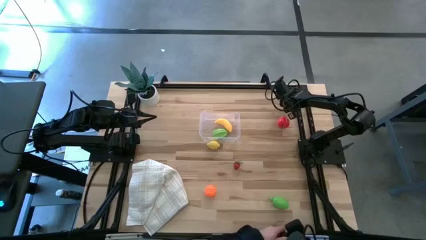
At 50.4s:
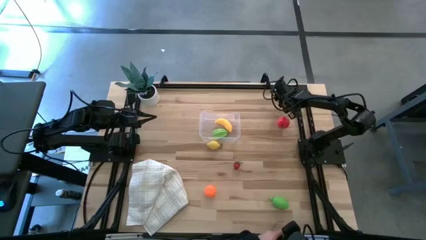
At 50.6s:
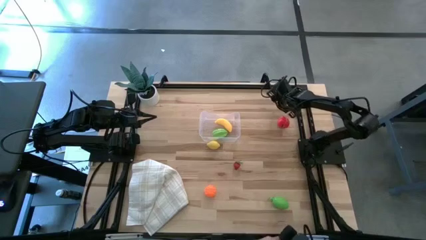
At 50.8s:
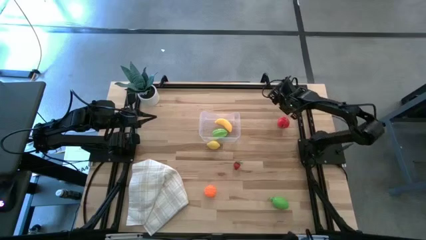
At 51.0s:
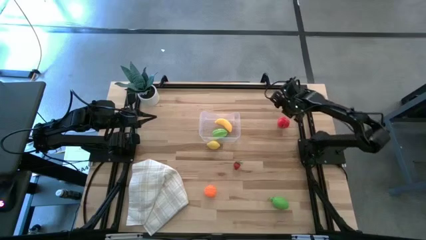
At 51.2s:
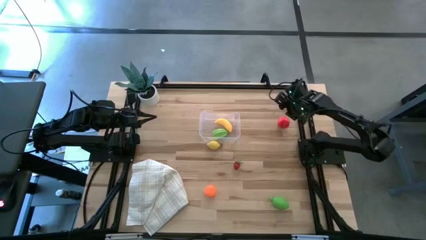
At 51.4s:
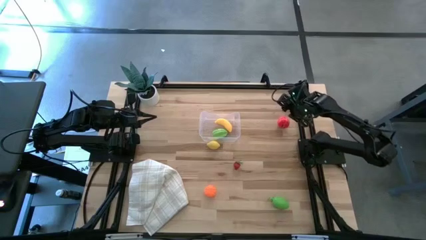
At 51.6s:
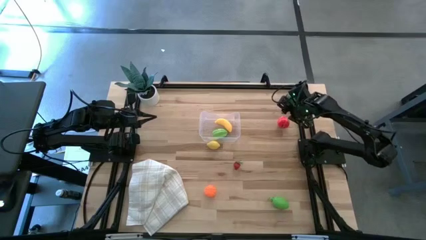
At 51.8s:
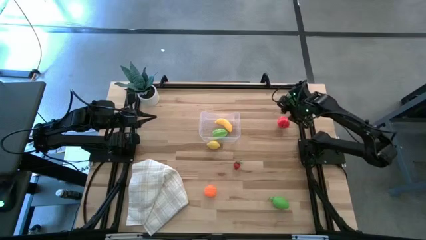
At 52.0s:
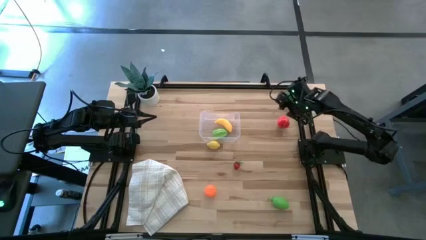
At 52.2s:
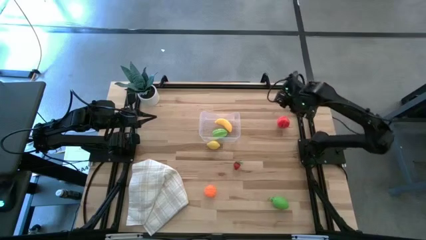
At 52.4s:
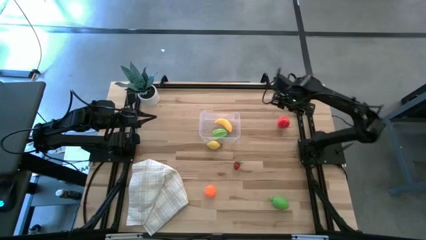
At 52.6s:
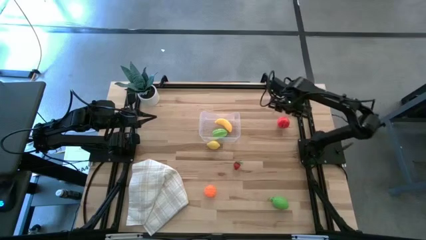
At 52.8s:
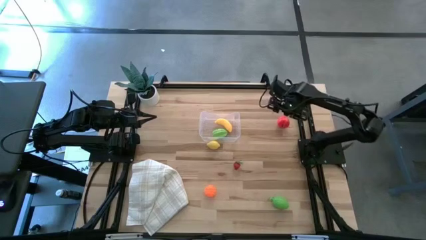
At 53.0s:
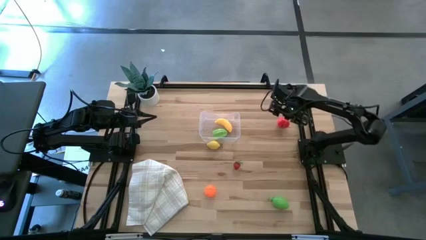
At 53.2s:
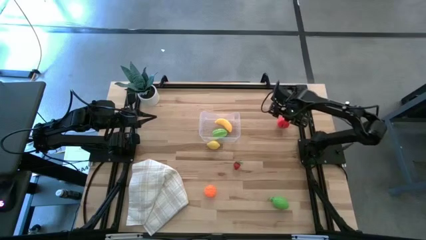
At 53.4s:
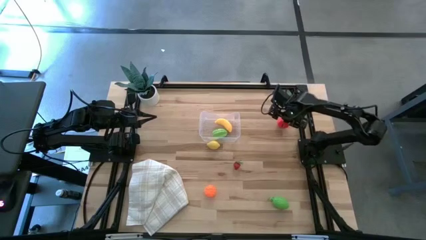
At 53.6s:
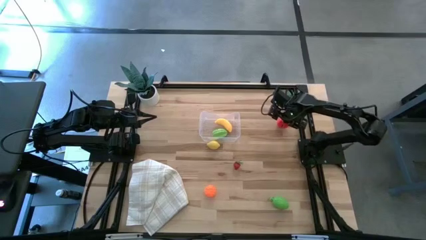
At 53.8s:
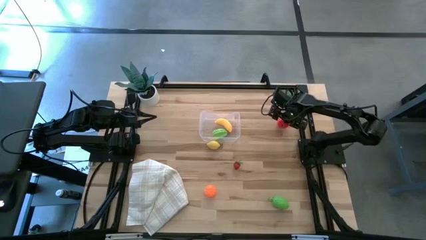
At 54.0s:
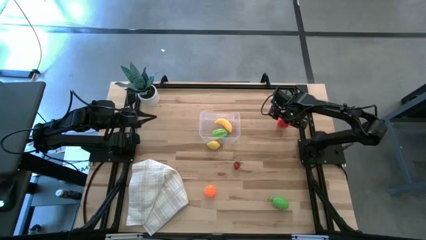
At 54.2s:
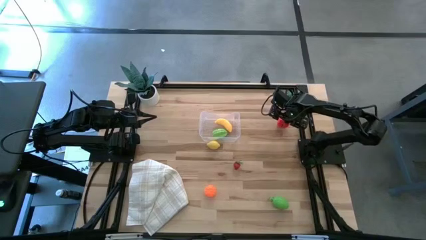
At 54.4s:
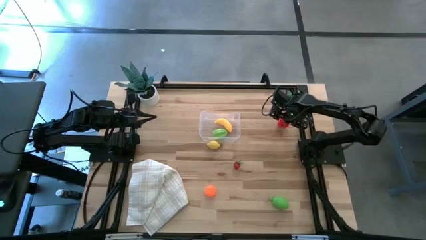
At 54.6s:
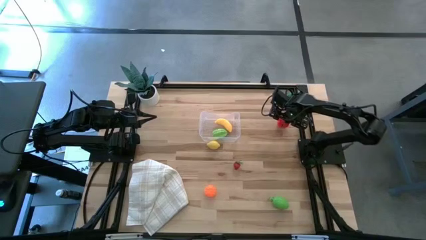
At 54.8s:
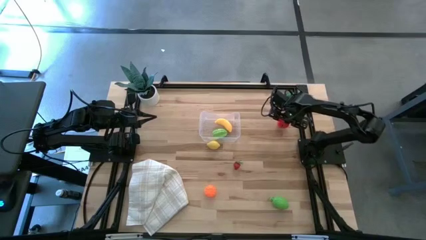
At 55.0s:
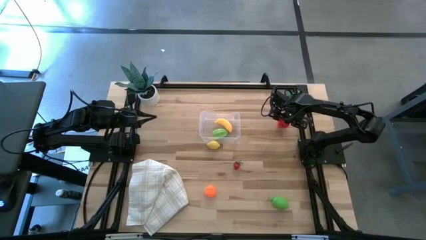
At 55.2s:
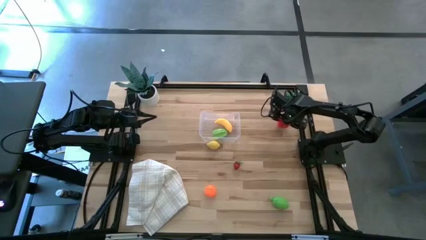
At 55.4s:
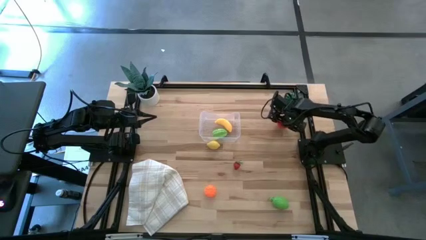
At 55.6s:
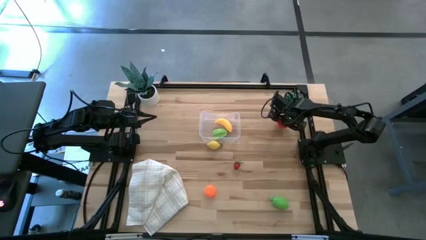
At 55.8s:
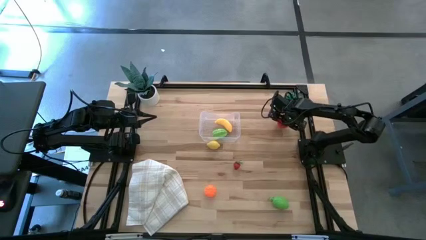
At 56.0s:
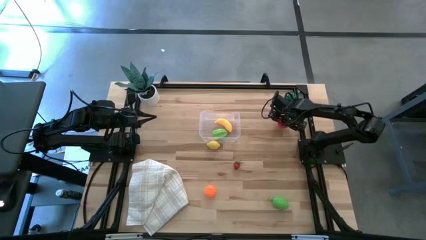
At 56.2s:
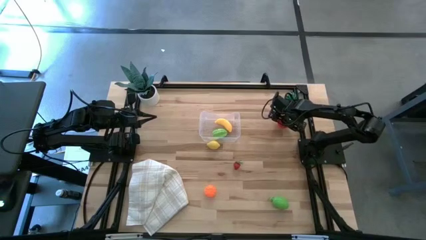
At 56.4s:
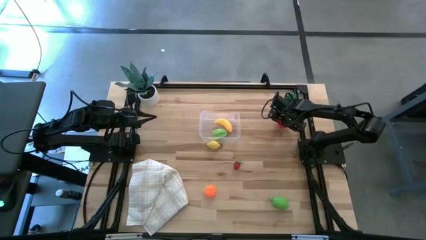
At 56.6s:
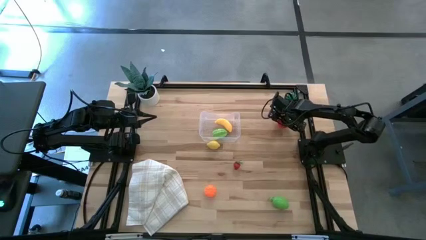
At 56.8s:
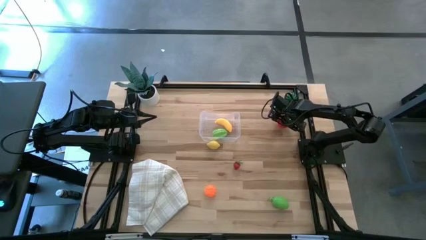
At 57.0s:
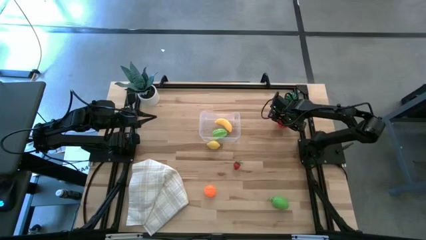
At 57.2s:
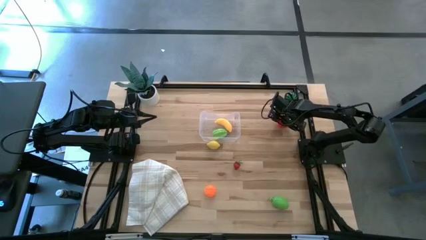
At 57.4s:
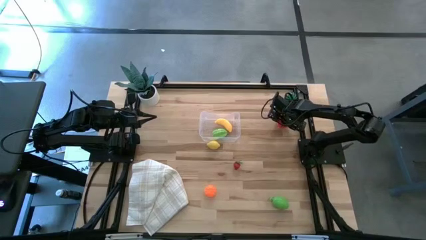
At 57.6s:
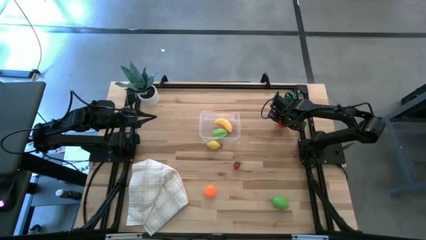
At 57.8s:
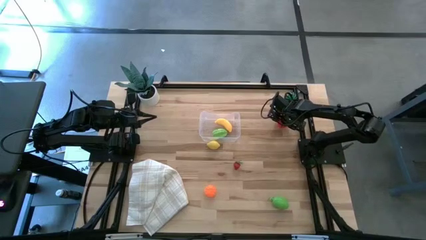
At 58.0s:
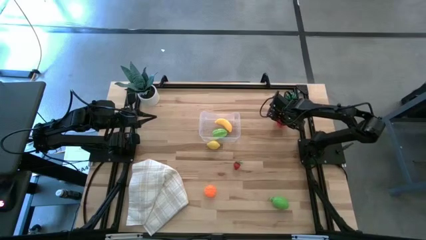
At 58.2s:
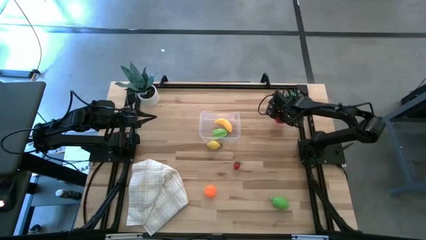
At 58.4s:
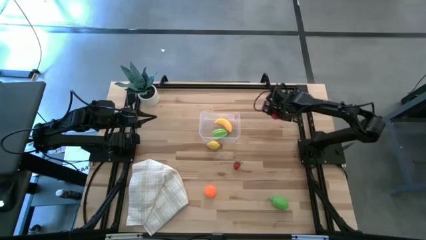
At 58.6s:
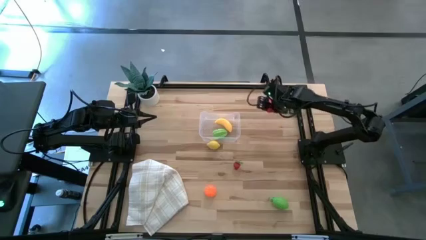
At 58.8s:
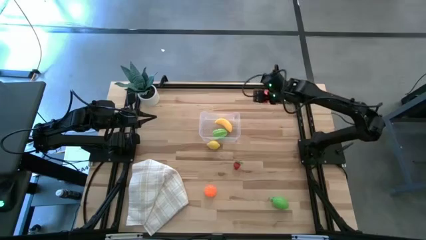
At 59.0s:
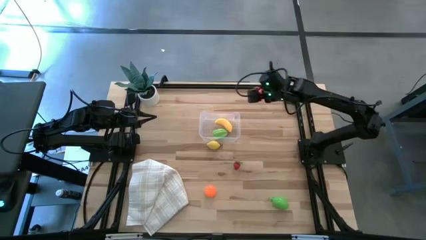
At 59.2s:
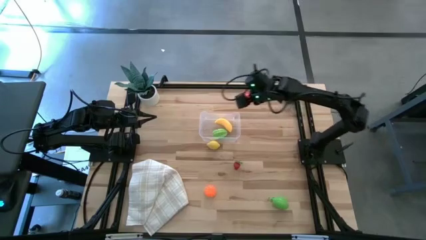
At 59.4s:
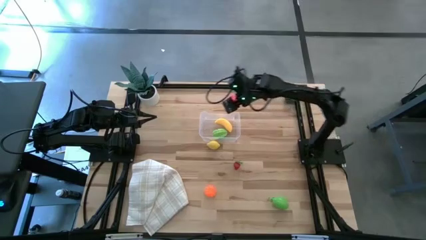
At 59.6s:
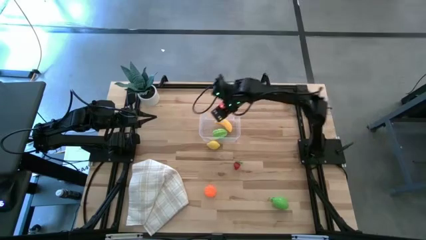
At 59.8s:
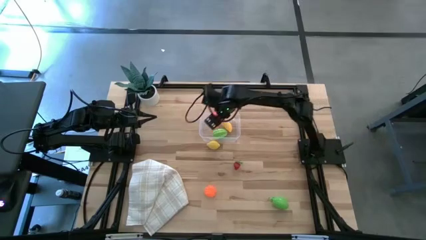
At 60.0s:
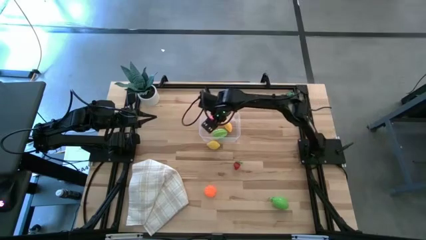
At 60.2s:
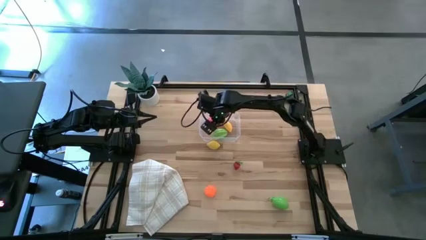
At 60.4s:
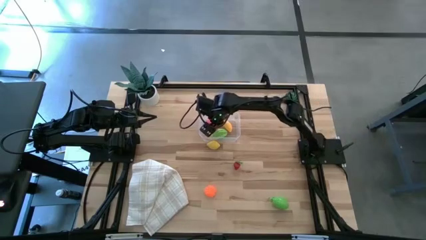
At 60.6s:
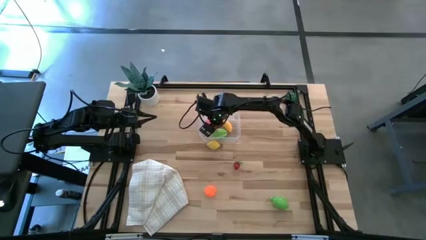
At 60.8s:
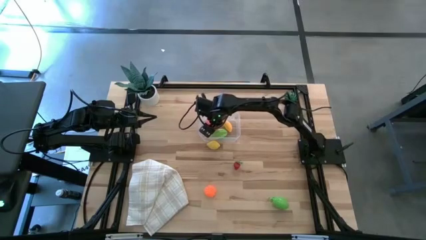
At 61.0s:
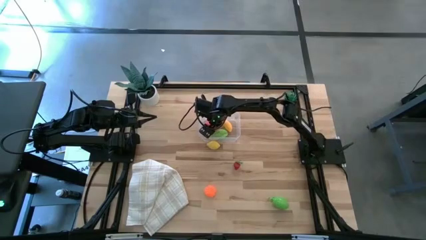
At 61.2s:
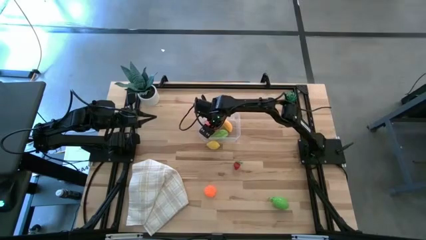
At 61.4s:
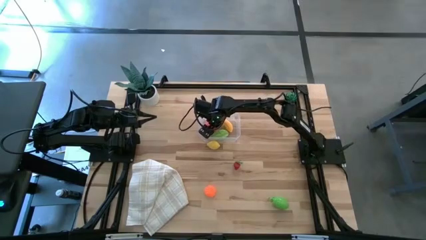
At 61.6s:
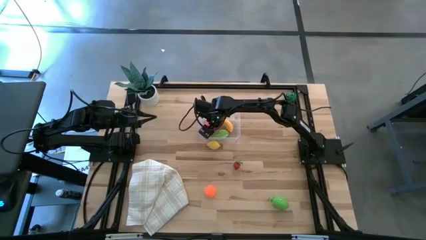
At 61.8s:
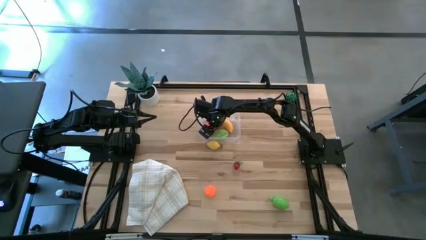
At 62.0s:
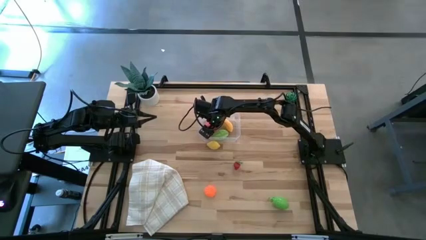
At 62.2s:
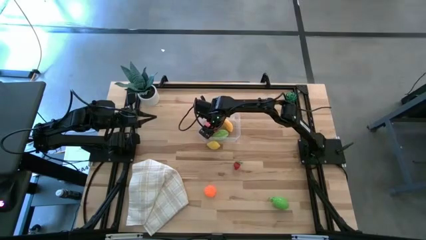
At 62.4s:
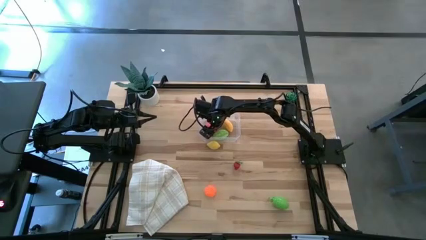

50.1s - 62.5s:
Task: Pick and placing Produce into tupperware
Put the apple into the transparent bin
